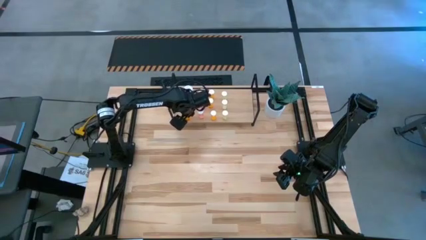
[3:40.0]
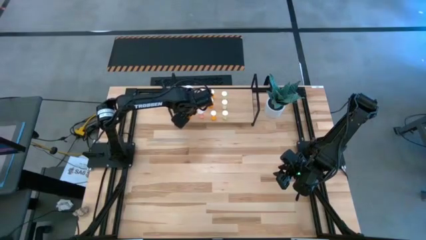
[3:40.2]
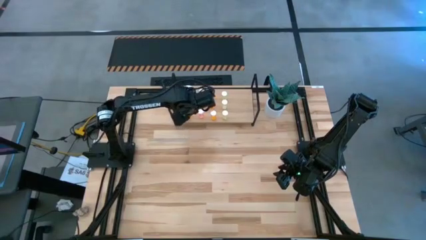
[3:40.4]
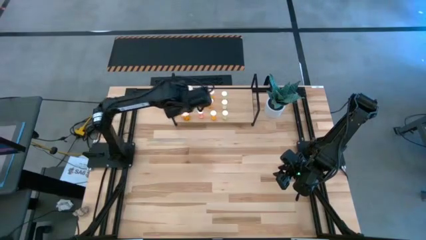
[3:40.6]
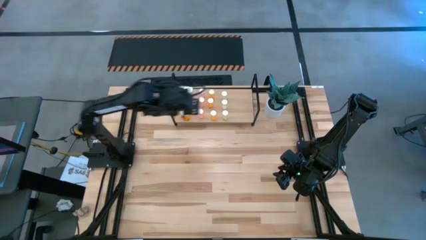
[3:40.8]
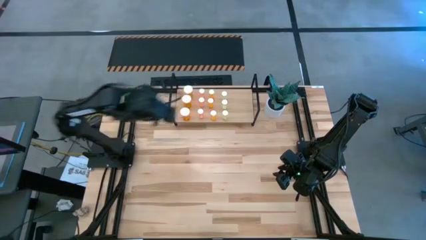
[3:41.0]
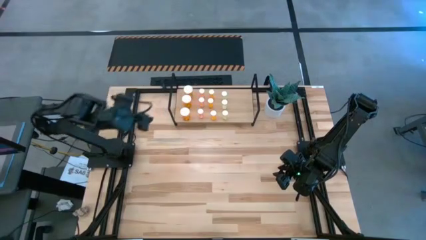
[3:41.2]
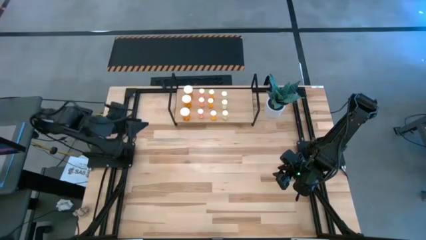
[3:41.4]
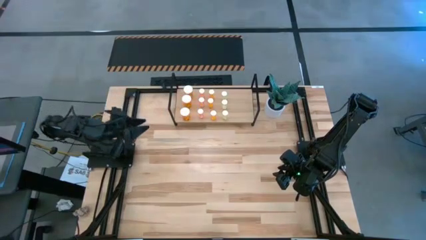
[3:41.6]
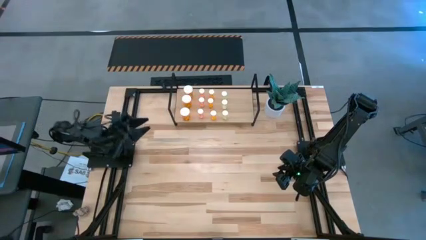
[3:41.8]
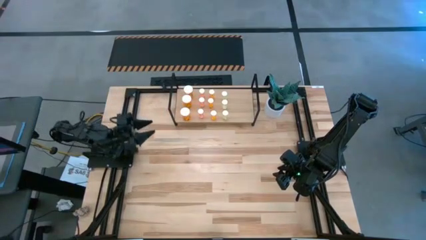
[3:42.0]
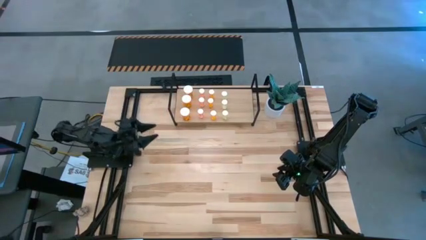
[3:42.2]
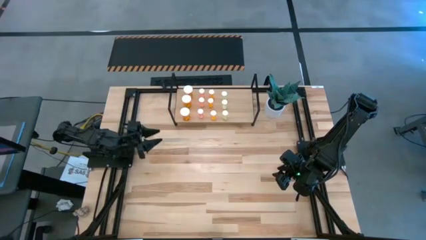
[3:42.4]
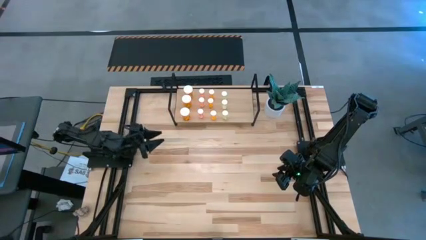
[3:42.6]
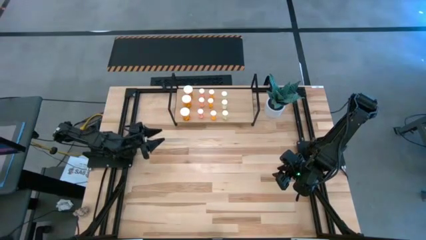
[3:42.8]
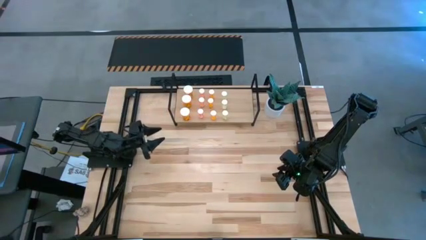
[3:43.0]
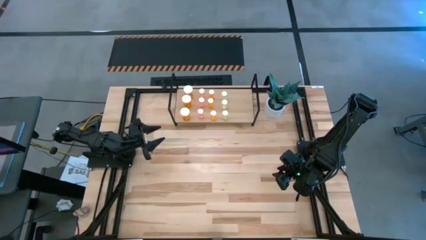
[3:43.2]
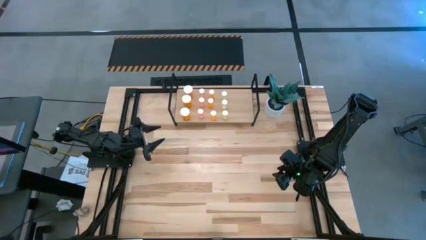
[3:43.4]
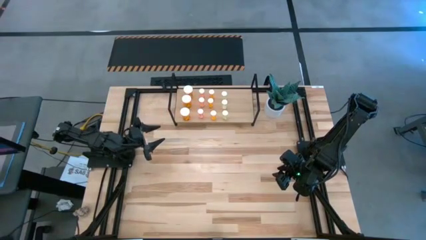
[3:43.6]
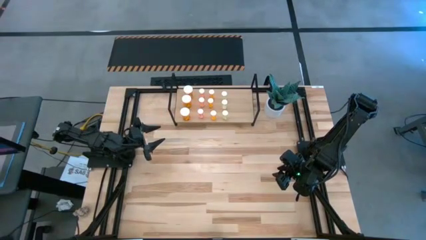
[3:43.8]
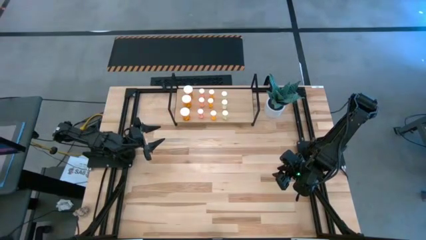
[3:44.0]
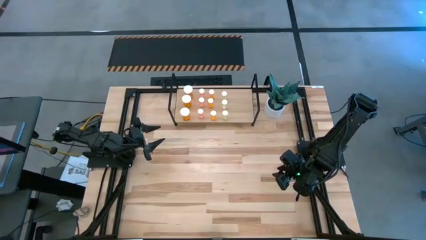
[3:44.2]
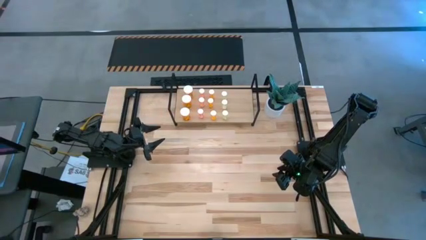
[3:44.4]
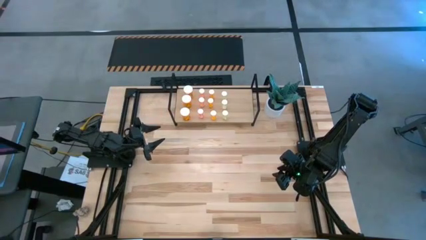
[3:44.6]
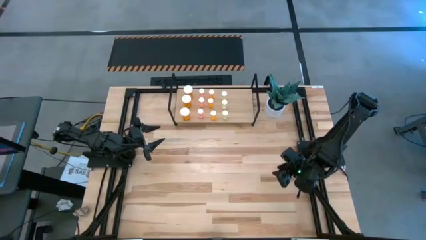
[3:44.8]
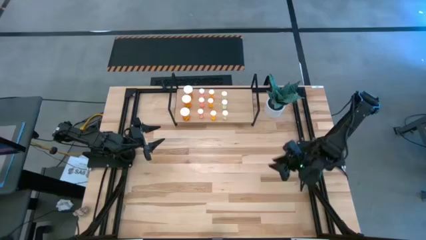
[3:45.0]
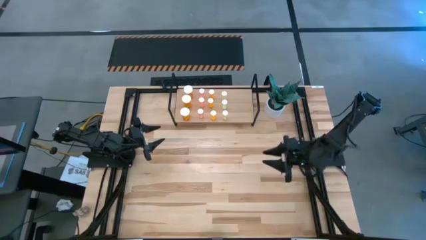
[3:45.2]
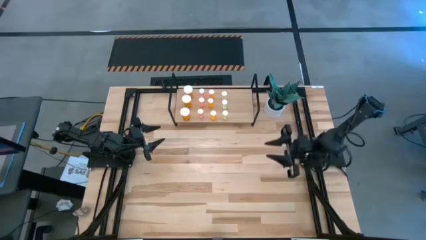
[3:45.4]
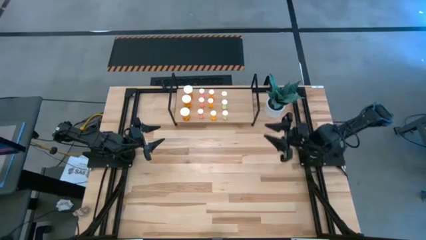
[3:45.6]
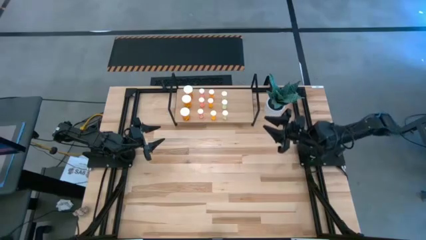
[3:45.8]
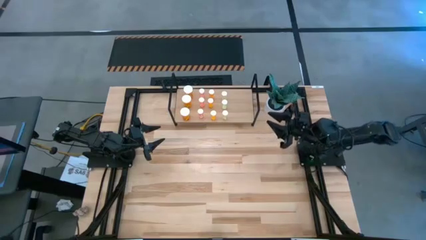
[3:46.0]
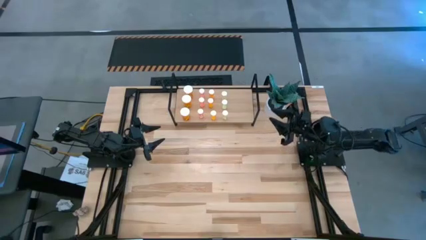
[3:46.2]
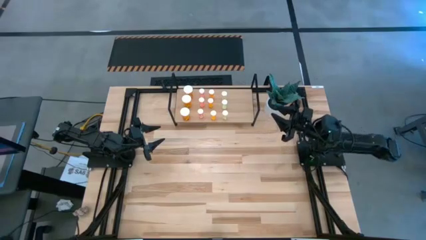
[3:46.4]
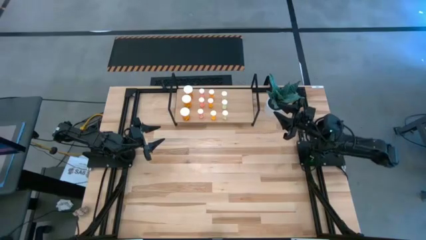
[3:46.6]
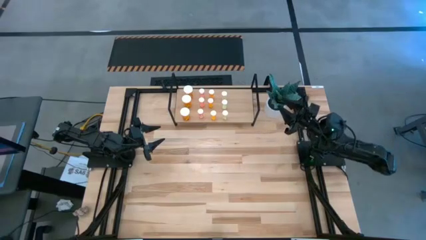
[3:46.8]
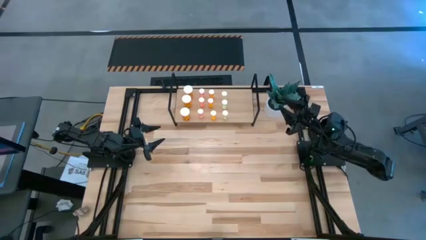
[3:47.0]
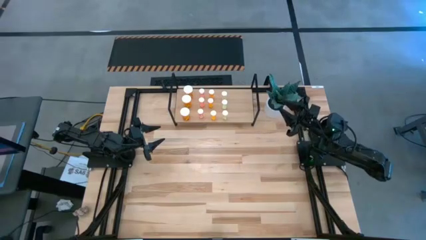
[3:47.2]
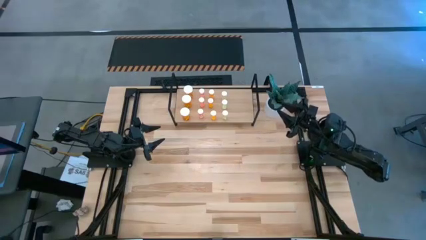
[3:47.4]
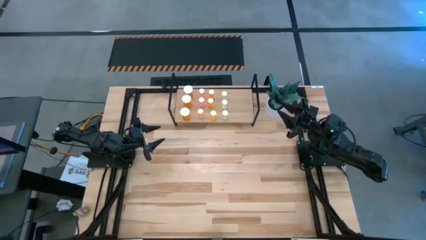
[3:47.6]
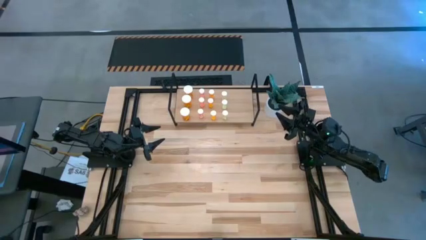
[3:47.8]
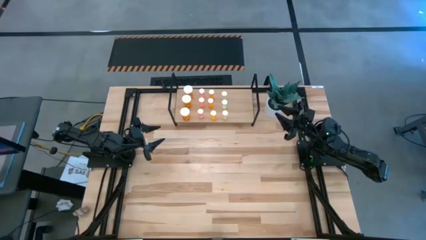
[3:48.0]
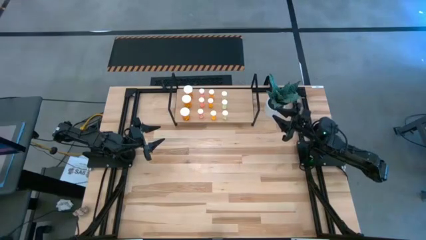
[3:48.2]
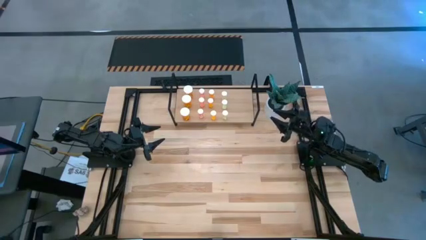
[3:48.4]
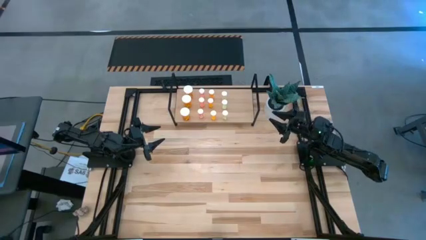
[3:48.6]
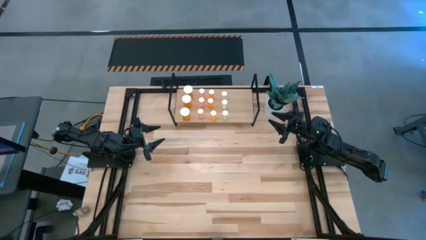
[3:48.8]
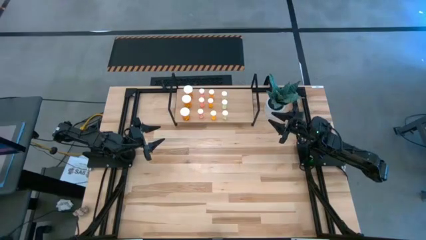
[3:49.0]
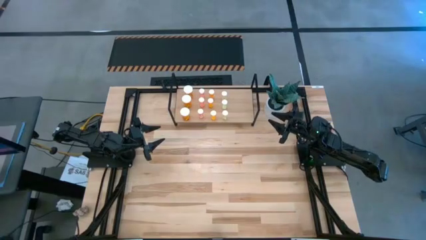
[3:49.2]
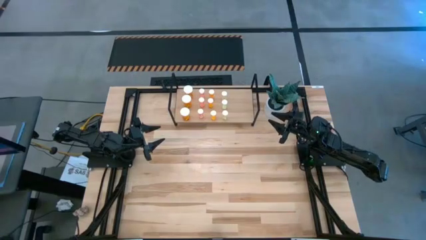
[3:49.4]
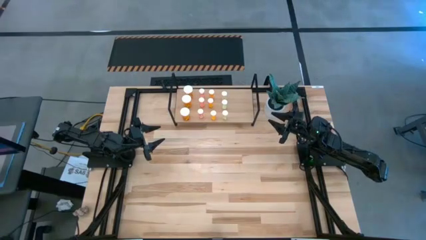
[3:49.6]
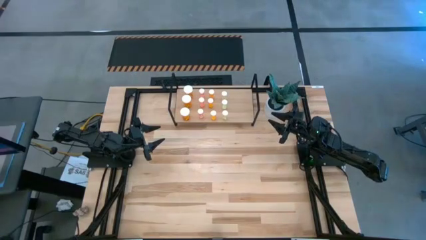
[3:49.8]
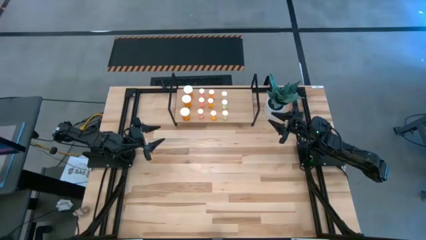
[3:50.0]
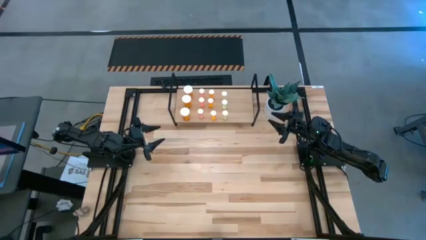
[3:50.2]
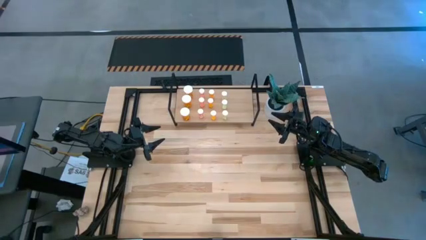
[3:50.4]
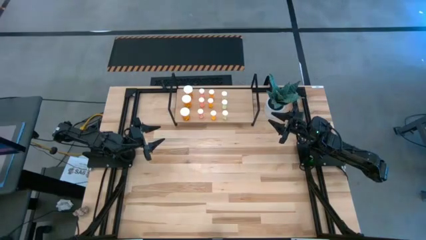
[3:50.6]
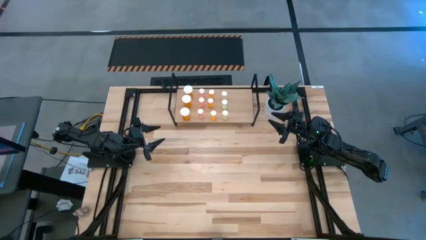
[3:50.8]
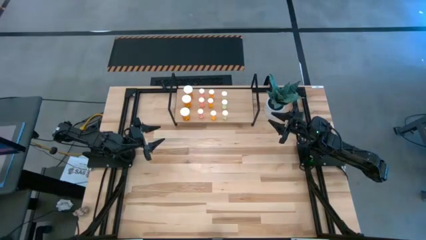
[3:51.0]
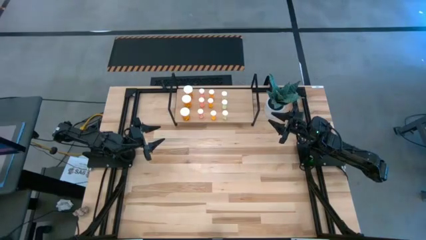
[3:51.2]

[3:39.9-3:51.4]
Task: Pick and place medicine bottles onto shelf by color
Return to Home Position

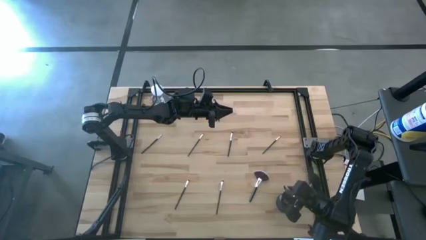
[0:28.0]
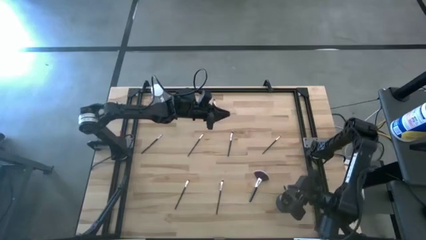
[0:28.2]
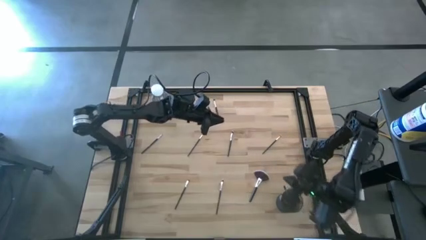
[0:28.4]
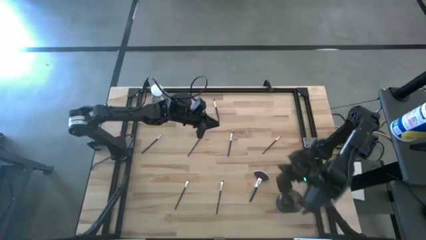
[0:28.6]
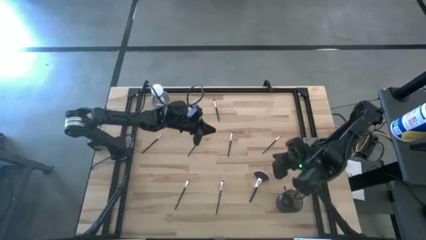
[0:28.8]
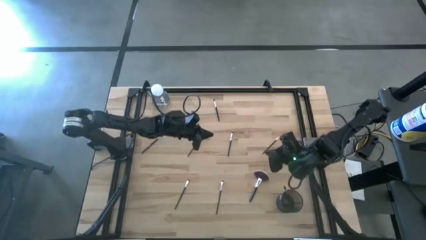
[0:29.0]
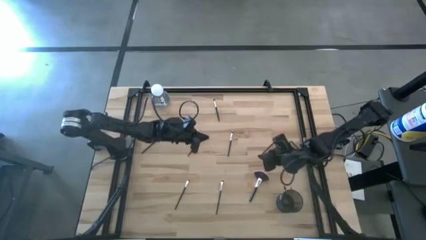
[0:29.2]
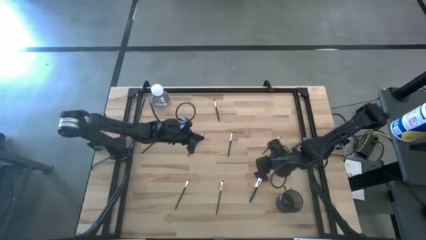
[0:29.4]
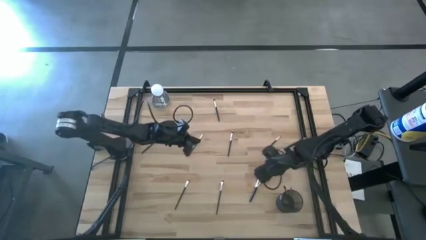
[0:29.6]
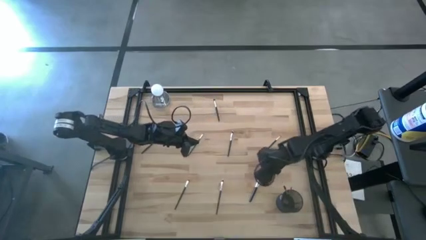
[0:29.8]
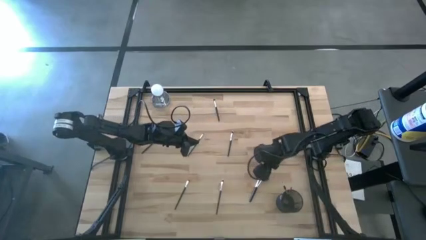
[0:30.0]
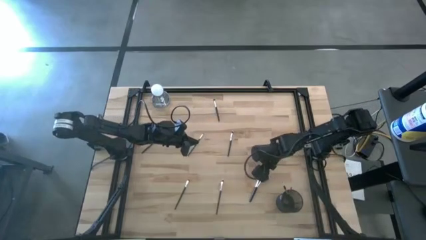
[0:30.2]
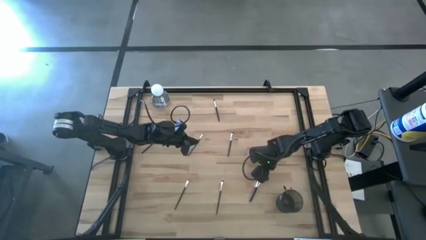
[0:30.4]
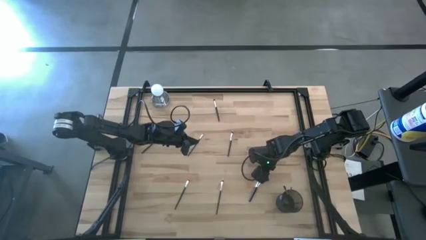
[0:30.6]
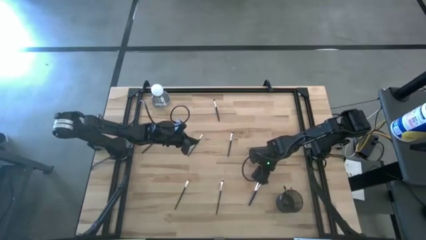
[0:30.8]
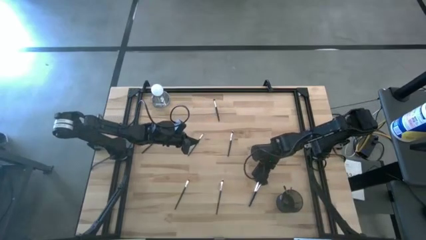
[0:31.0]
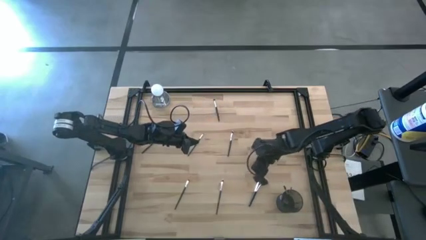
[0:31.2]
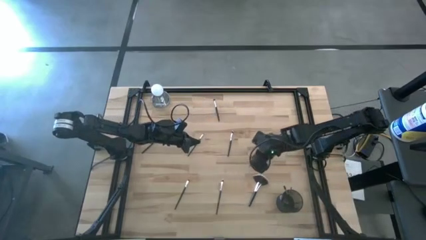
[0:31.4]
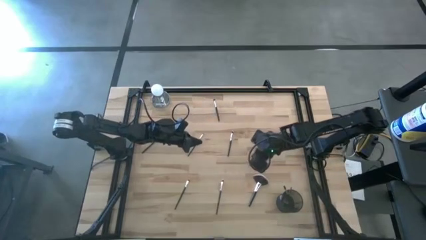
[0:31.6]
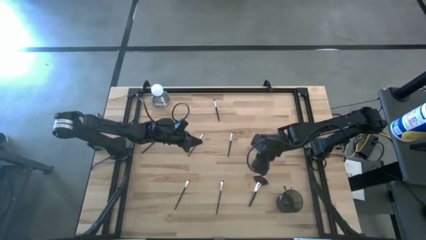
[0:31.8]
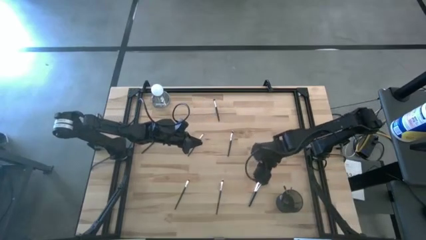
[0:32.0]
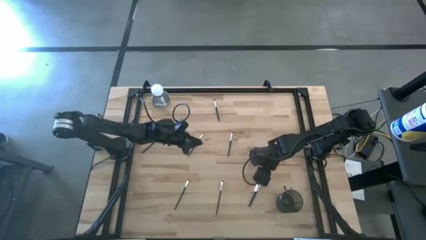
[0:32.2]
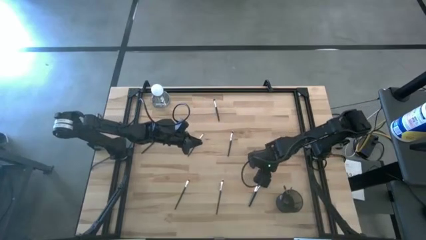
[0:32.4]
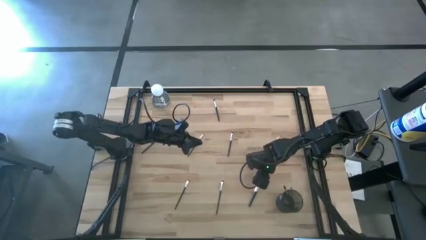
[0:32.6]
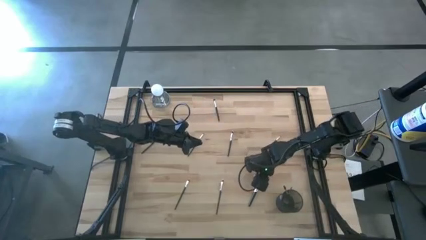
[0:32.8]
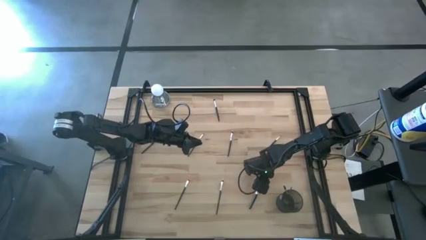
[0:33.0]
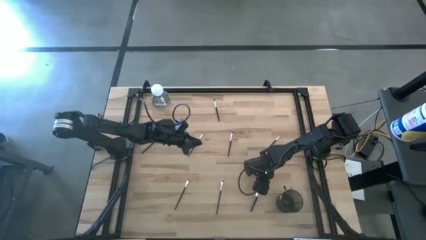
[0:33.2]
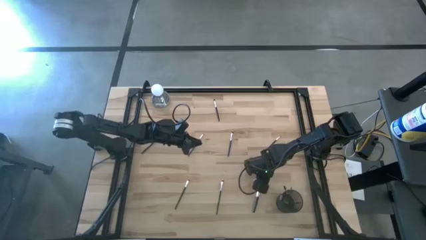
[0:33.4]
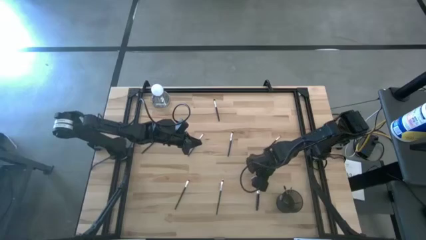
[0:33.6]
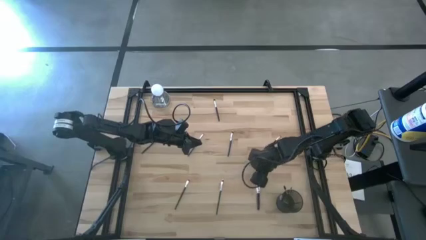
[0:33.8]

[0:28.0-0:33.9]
Task: Put items in baskets/containers
Put the highlighter brush into the brush holder
